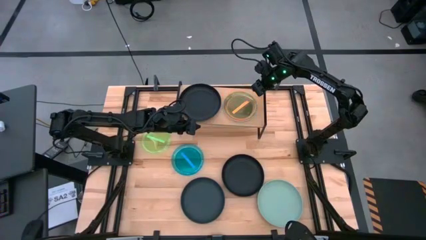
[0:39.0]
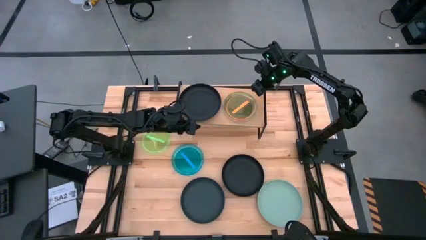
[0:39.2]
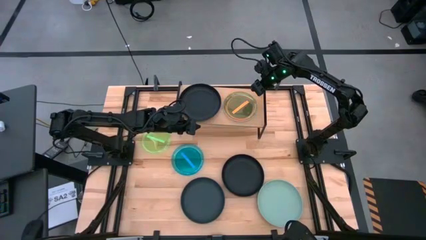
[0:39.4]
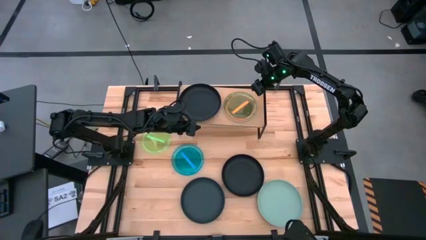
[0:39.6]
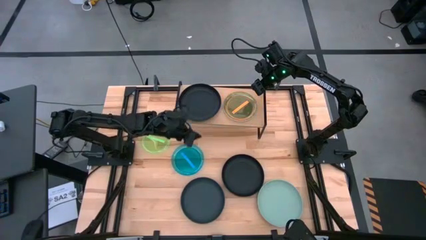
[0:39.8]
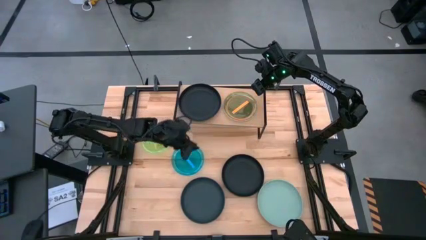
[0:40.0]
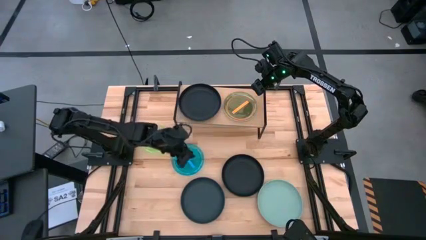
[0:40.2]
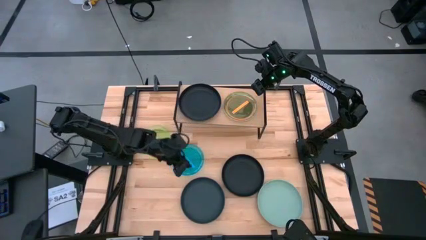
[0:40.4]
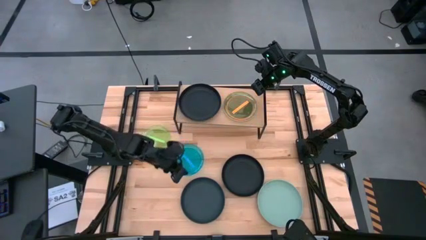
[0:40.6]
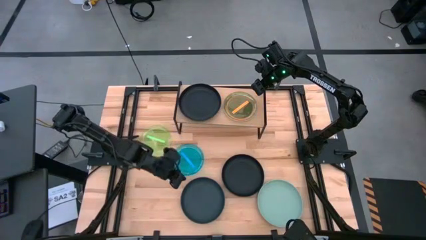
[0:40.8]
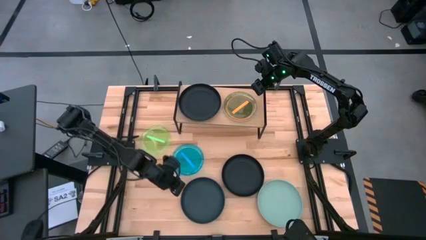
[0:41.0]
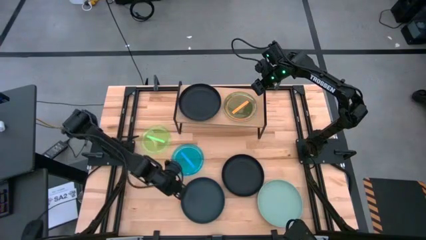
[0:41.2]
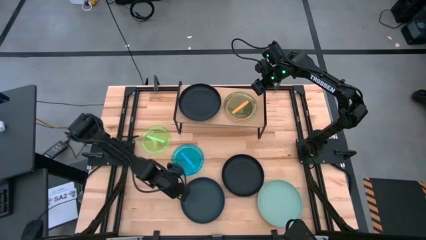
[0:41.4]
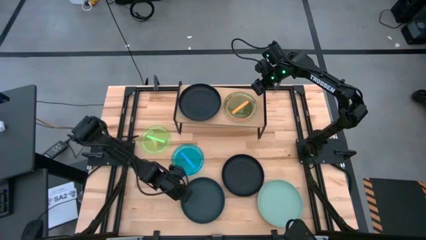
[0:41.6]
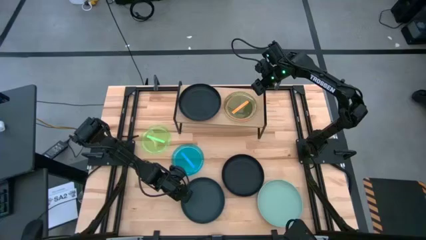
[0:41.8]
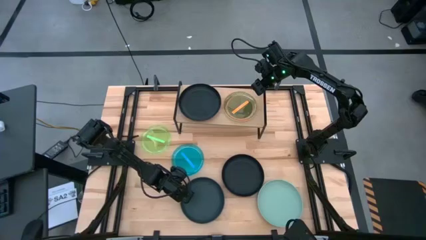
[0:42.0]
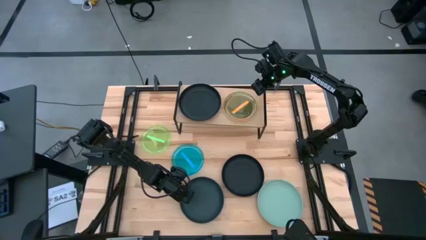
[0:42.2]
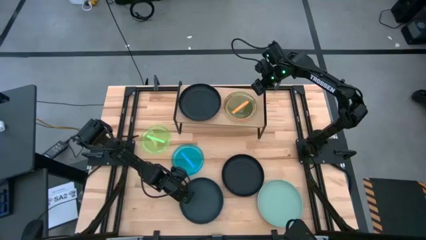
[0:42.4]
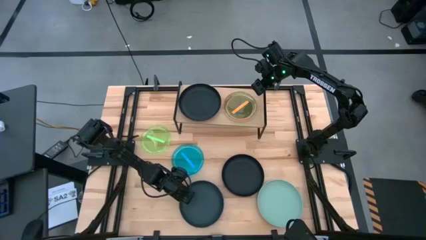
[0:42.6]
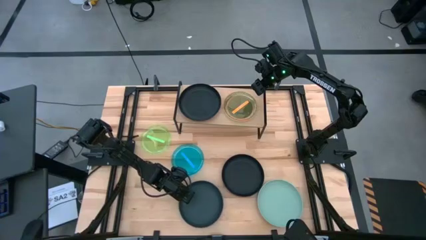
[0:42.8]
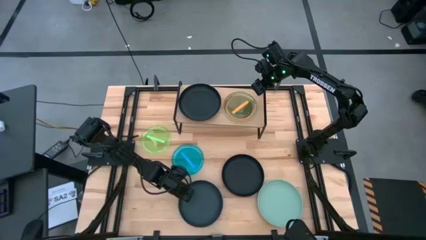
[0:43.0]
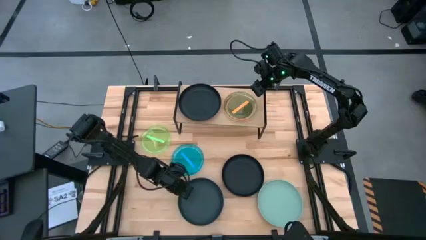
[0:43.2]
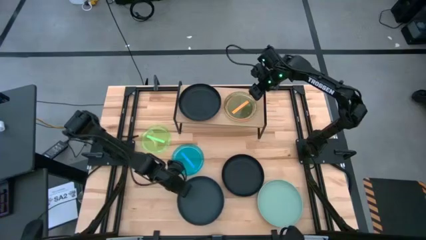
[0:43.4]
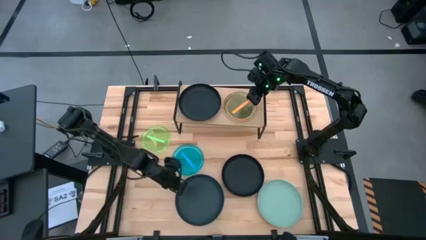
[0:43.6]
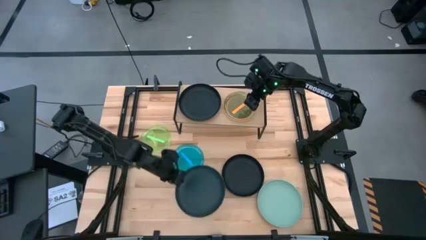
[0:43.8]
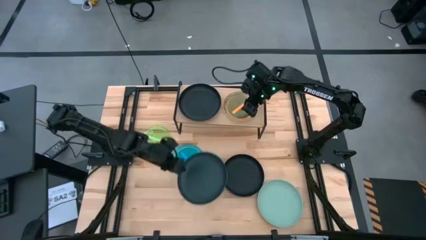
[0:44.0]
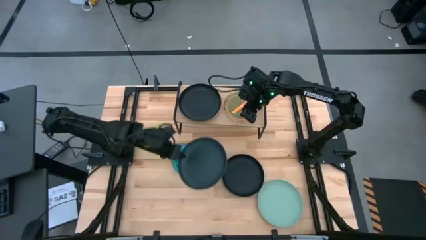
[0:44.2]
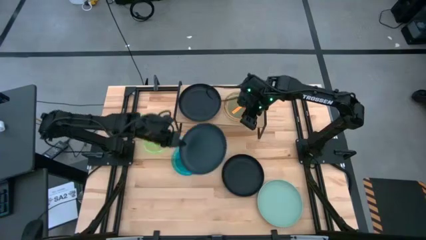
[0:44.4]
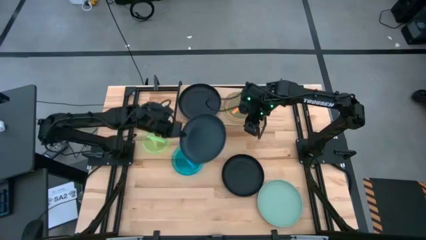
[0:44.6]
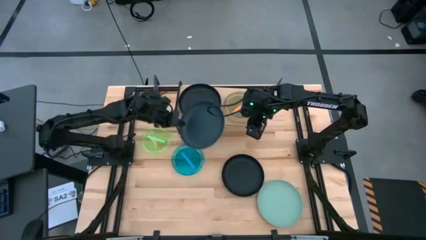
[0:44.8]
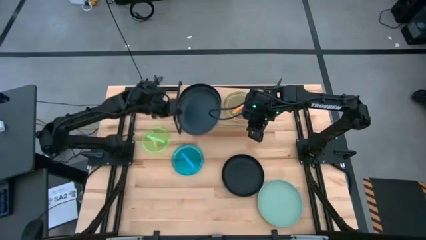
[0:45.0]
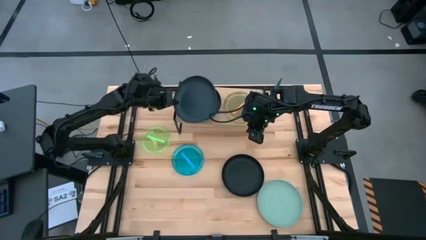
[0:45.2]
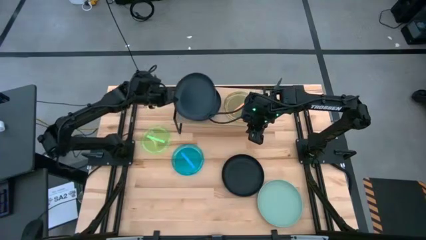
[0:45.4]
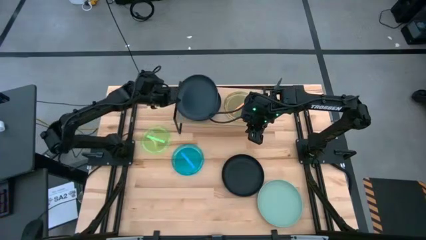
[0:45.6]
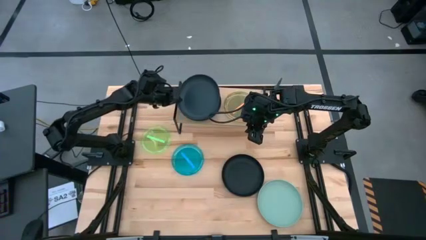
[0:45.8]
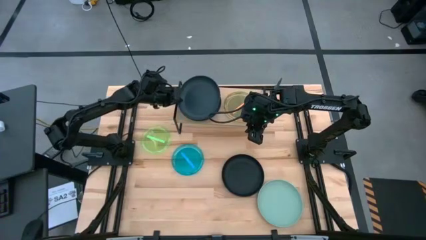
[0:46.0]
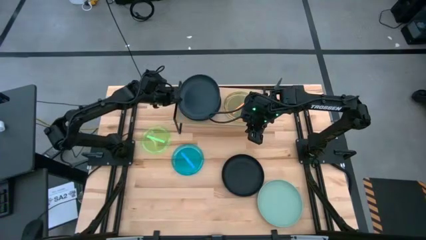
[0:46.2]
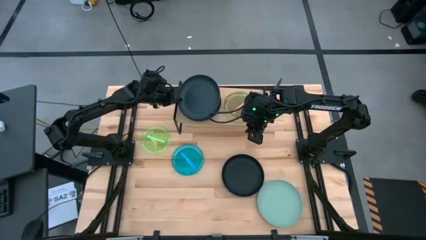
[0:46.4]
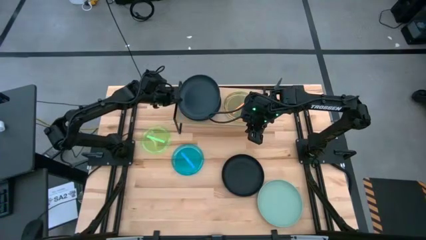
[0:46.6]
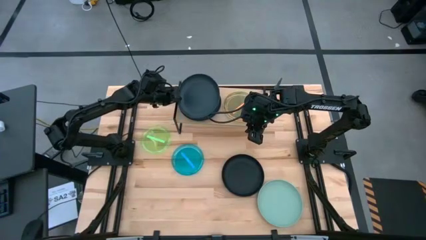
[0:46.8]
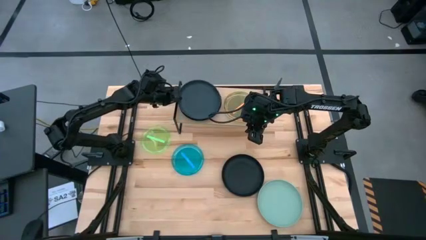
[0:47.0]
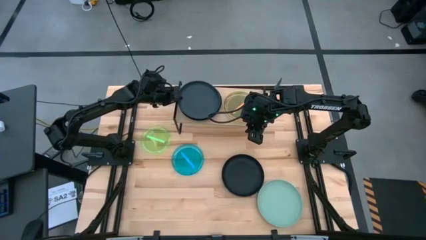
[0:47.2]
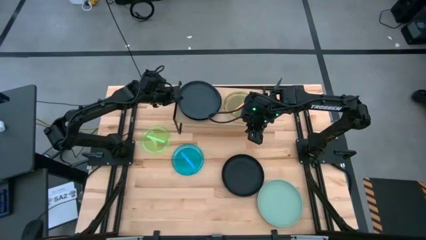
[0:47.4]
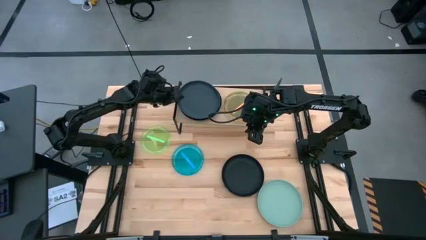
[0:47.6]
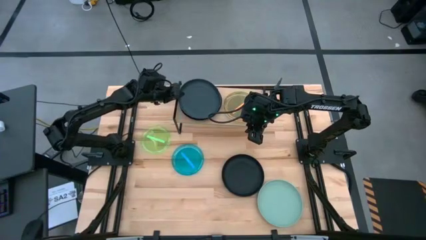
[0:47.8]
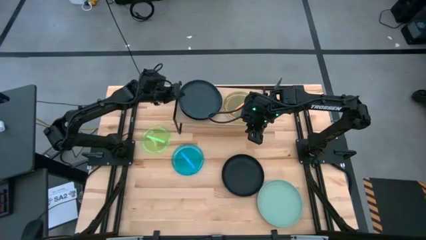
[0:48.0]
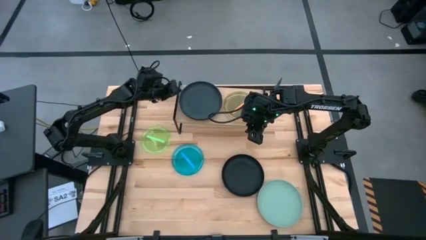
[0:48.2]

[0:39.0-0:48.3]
Task: Place and stack plates onto a shelf
Stack the left black plate on top of the black plate on the shelf

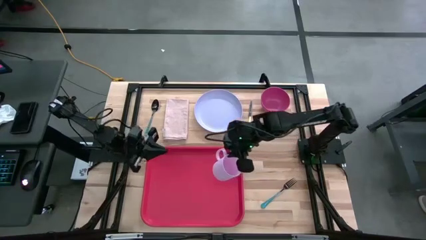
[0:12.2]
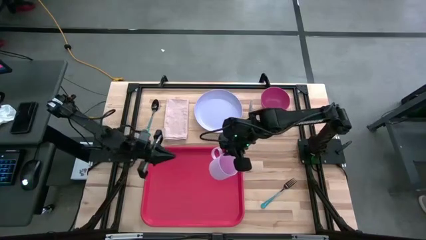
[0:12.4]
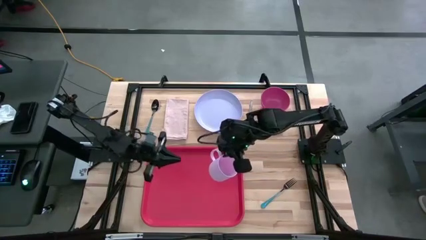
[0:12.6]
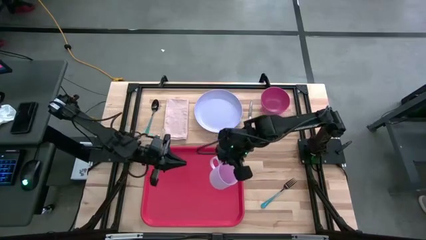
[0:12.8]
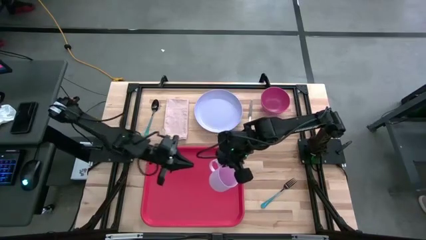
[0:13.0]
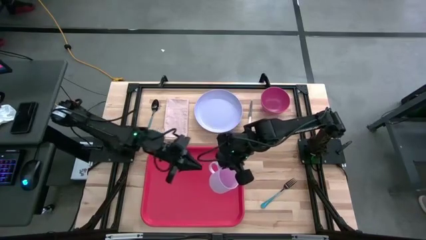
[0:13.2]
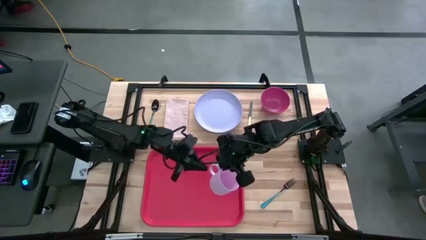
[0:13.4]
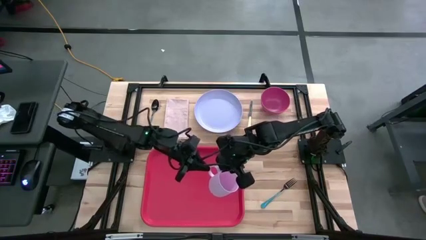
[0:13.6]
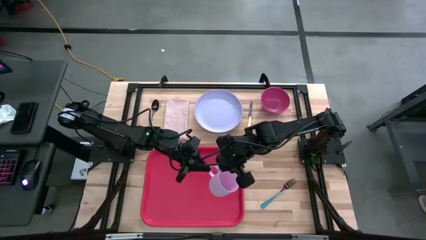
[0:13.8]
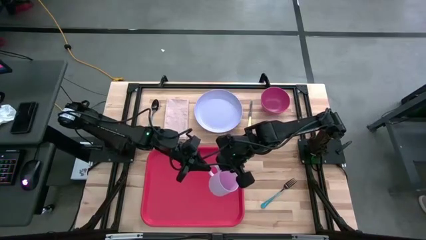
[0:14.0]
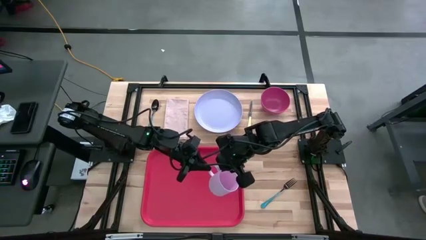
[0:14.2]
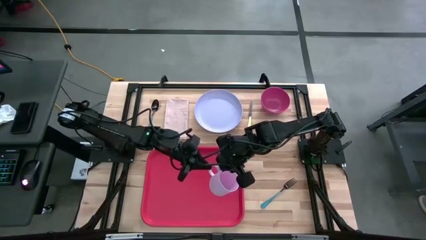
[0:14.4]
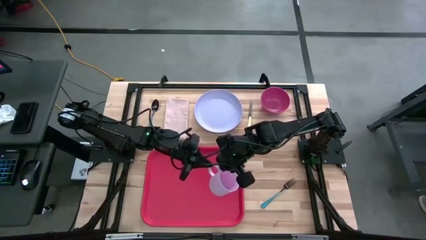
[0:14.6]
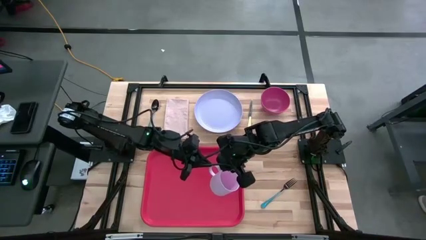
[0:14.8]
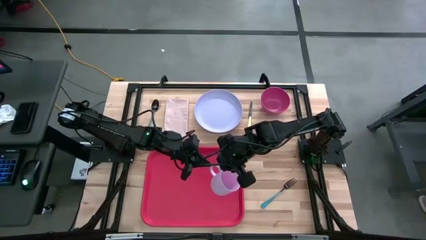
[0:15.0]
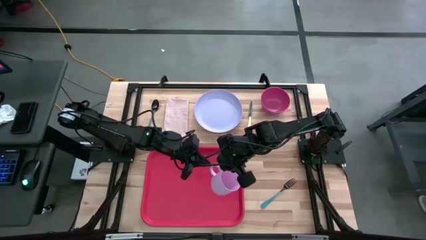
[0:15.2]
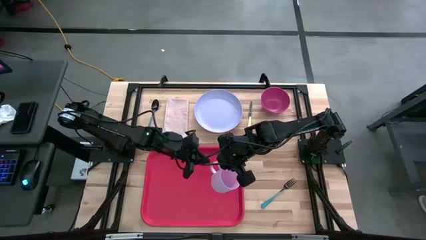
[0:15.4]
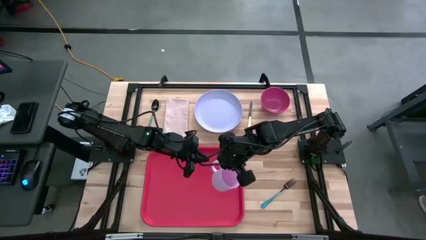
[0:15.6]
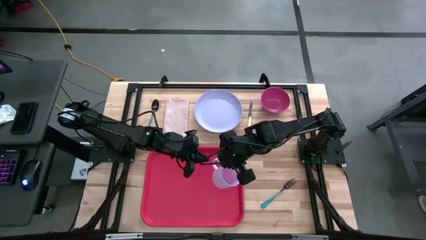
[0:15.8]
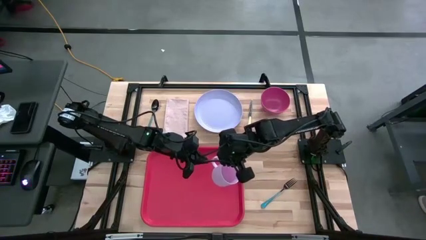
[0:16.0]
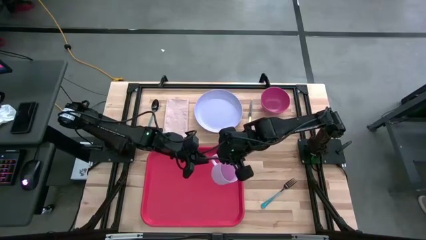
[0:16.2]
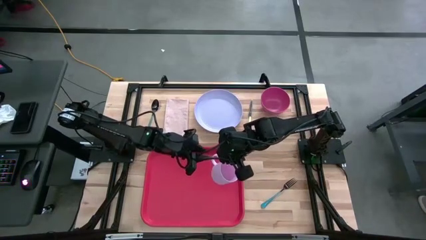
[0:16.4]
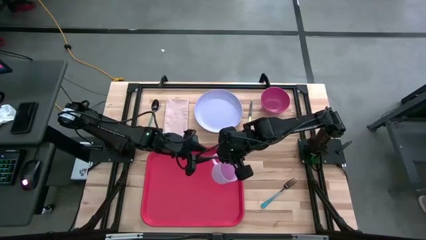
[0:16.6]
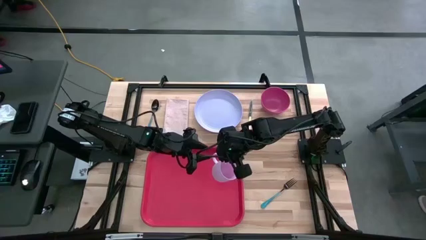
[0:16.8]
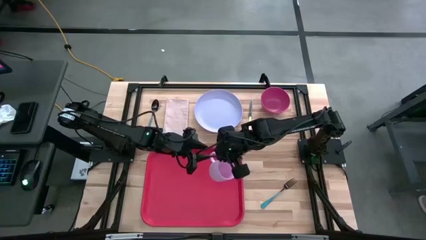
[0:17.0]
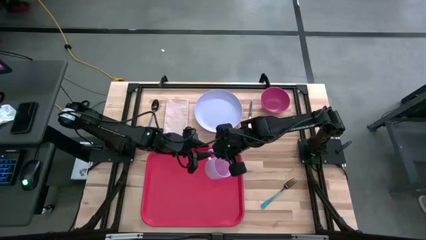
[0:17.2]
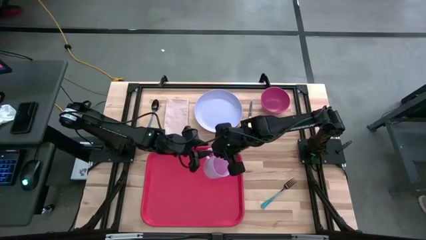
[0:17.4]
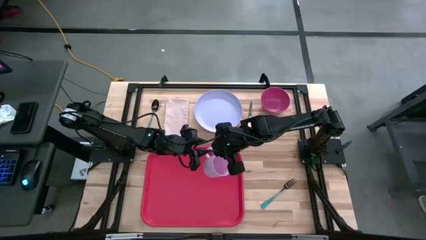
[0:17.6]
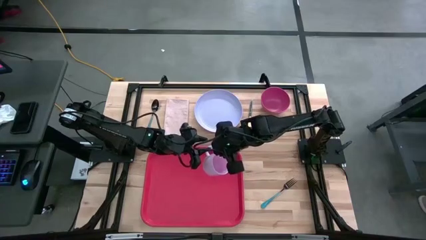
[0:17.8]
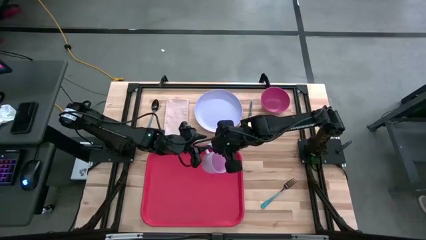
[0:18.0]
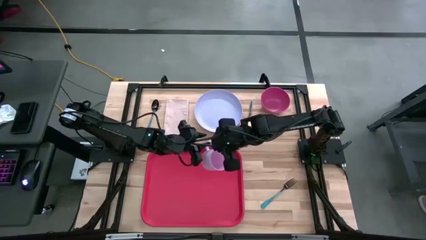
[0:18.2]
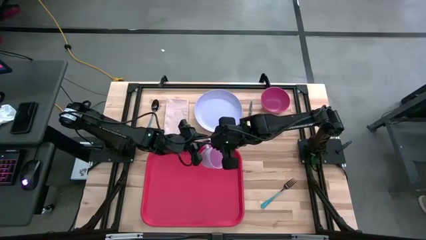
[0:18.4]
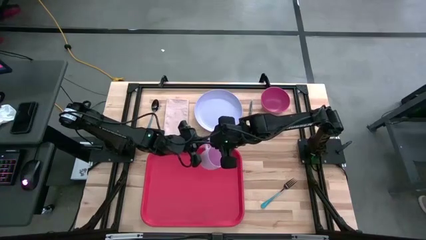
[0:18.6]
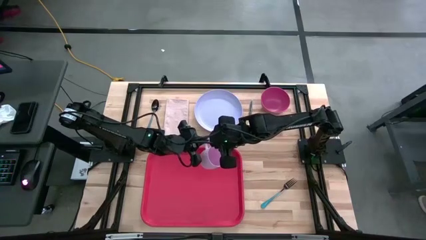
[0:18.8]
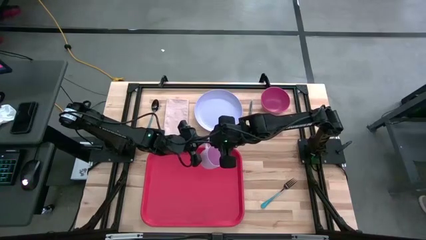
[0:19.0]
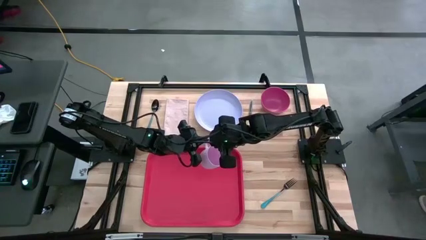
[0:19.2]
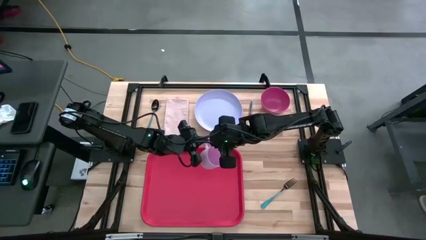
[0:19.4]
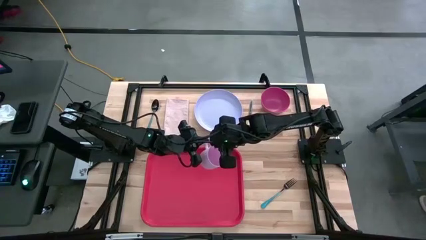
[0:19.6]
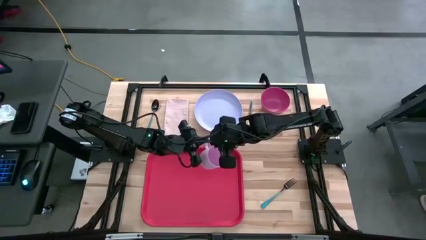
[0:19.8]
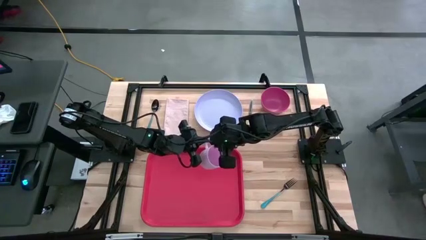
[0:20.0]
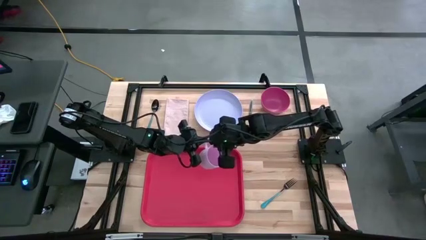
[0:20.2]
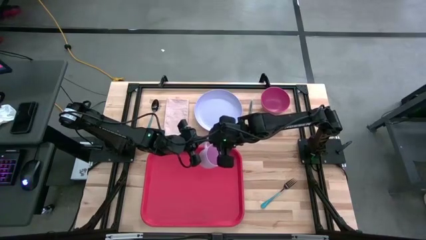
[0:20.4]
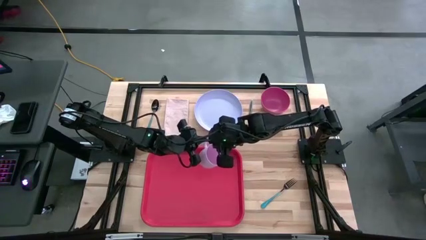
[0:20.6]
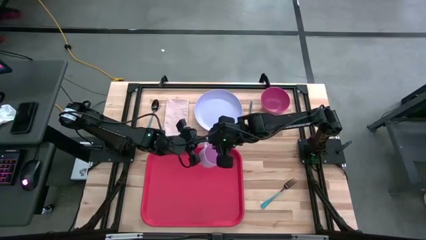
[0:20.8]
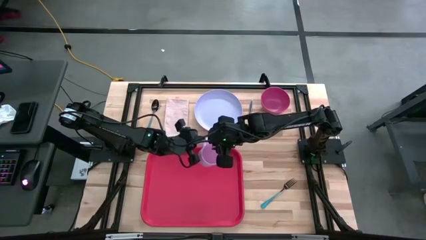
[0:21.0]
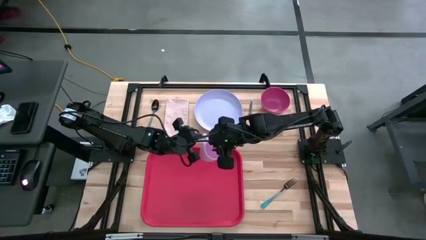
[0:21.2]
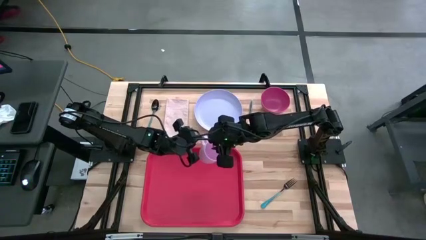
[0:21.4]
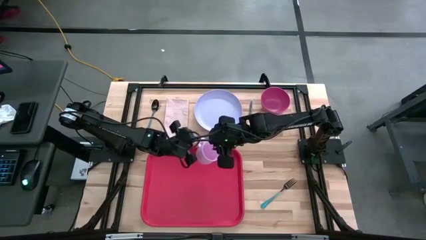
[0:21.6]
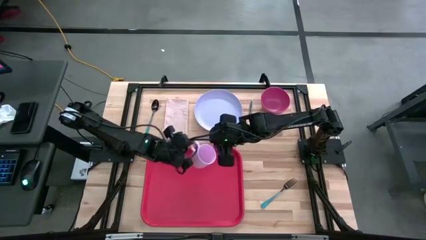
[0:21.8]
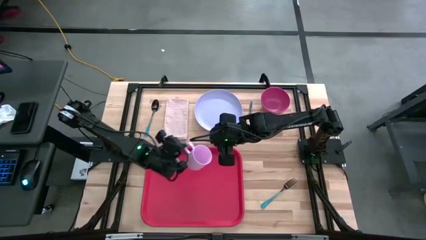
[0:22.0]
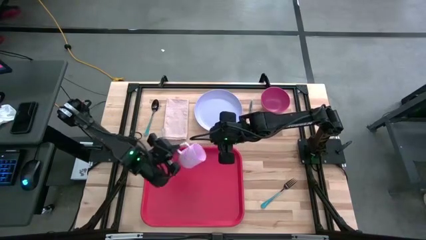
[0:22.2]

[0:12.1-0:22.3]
Task: Set up tray
Put the pink mug on the top left of the orange serving tray
